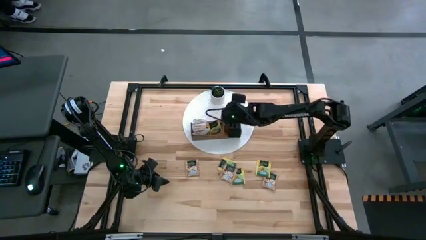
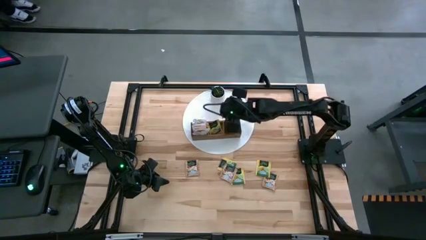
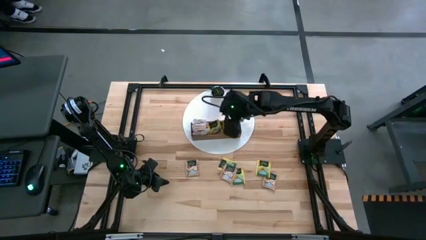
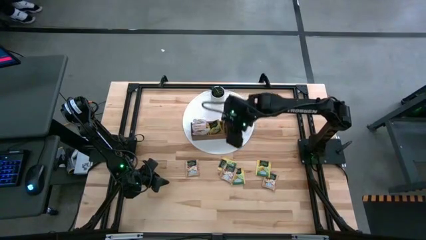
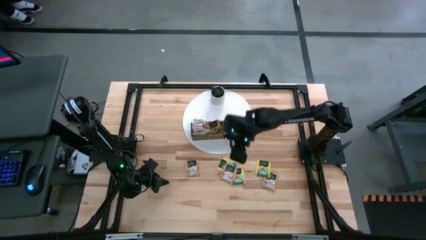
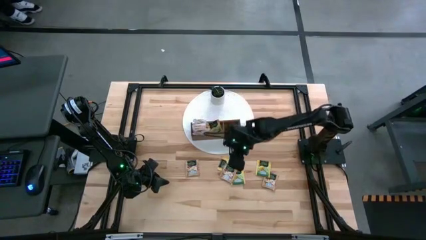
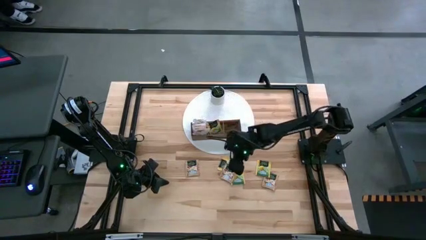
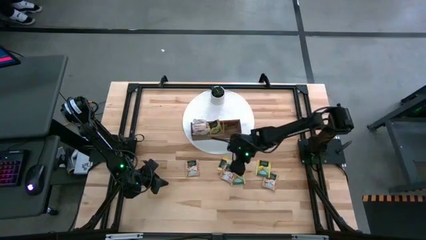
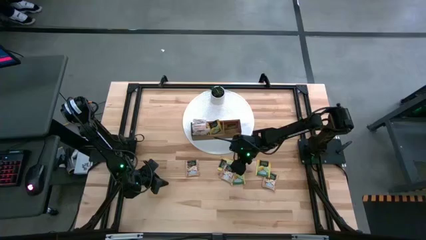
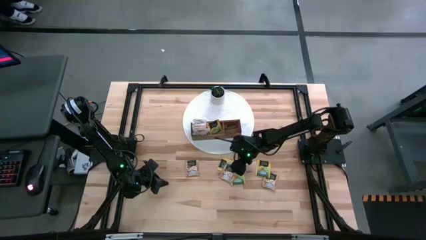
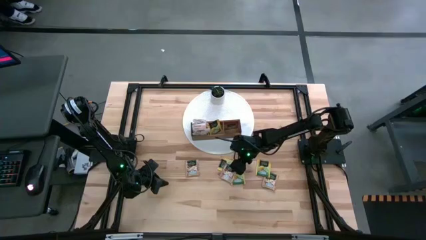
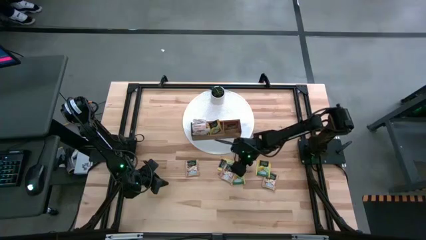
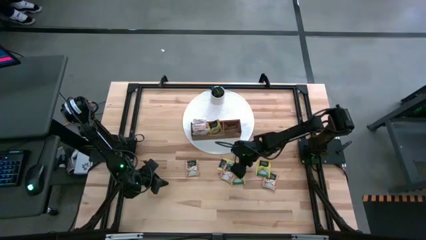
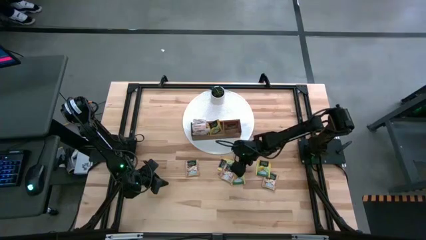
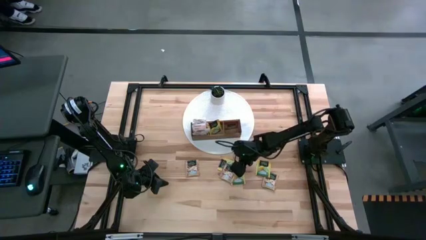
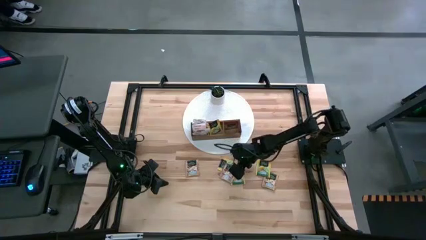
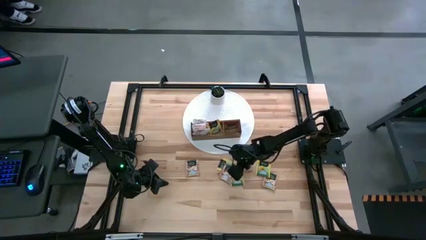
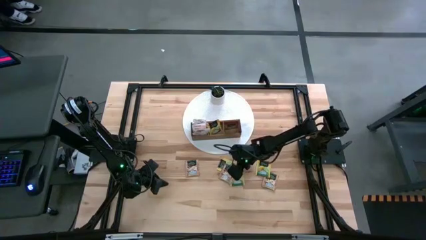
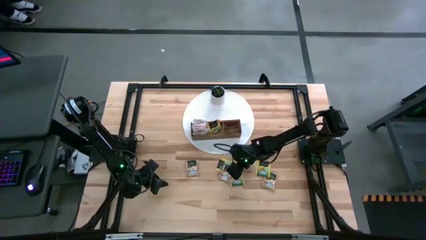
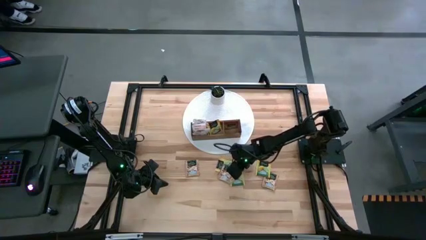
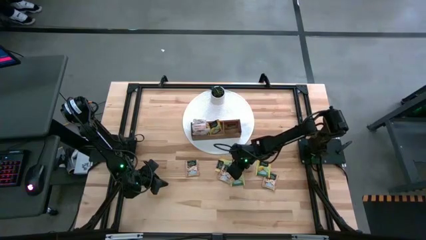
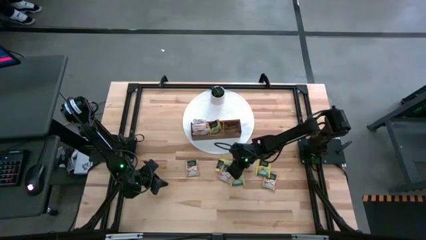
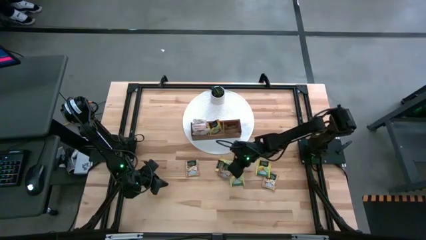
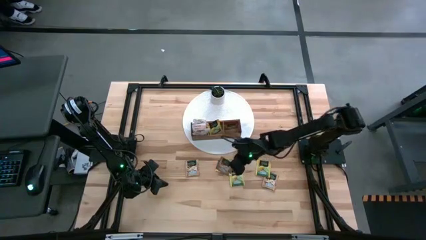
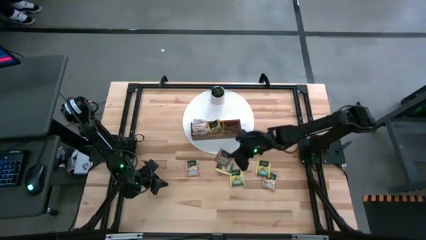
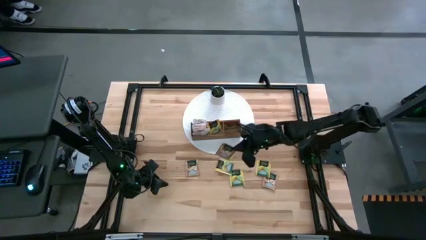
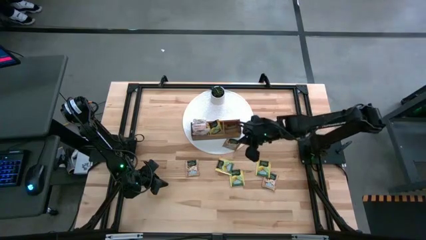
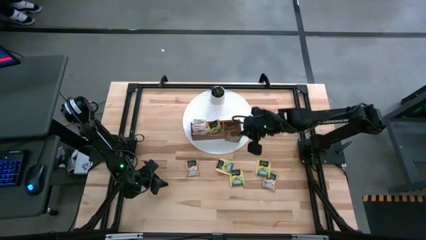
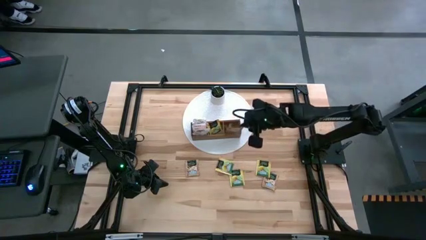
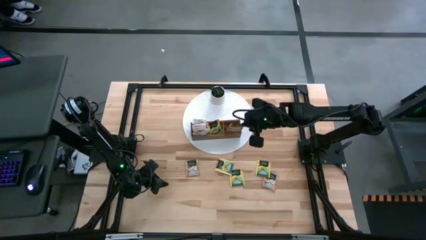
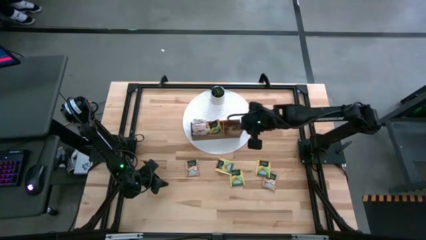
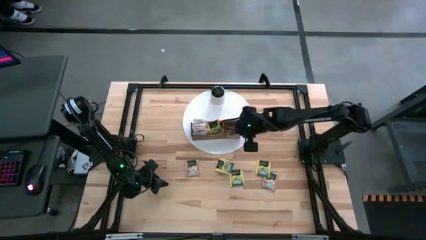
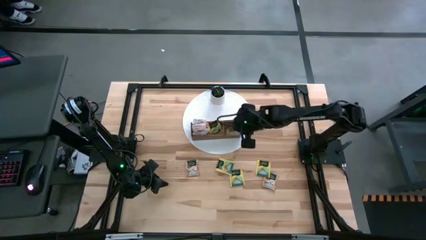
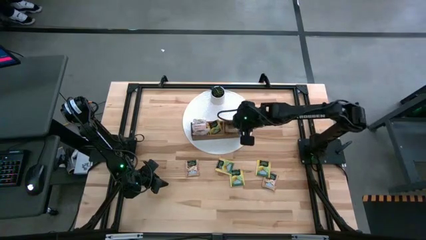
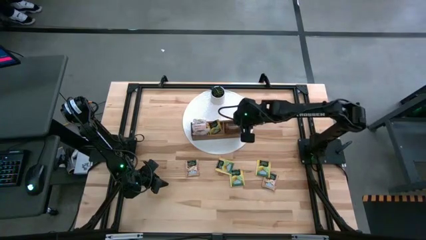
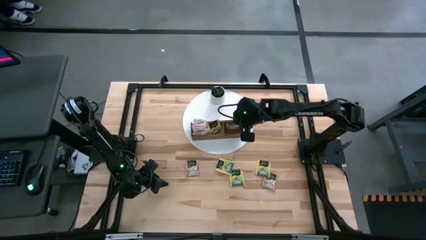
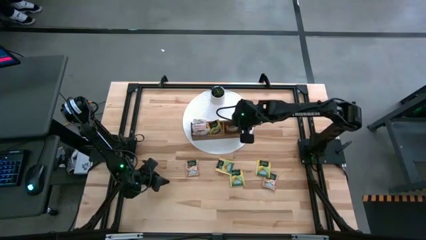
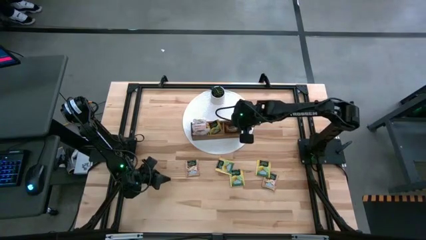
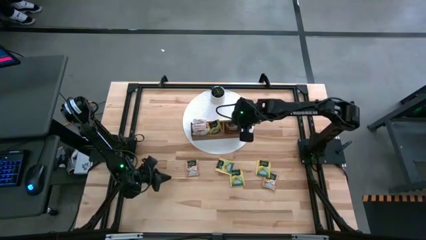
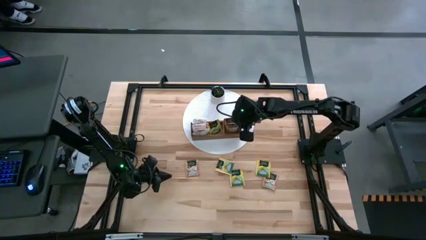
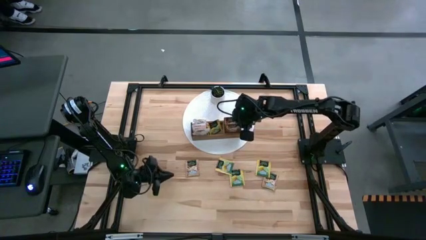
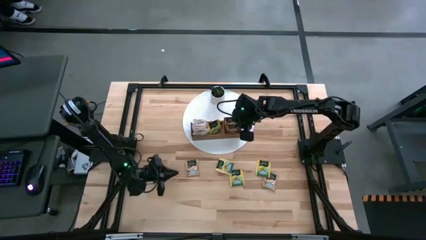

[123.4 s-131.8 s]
Task: Pick & Place Tea
Put the brown tea bag into the right section of the wooden organizer

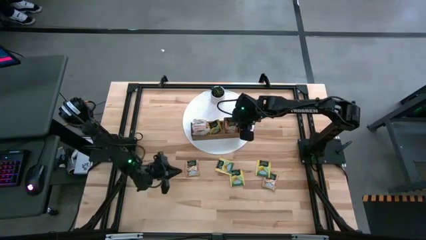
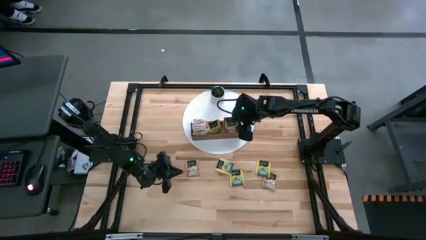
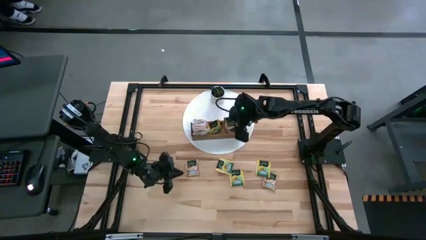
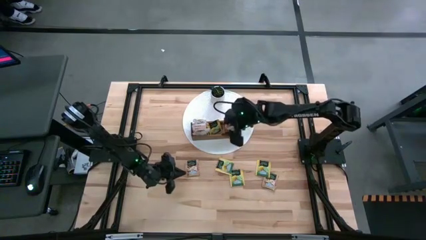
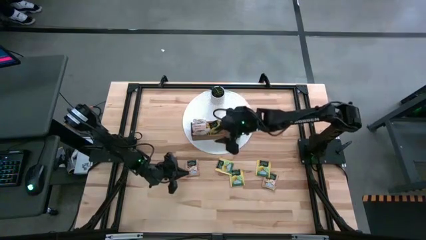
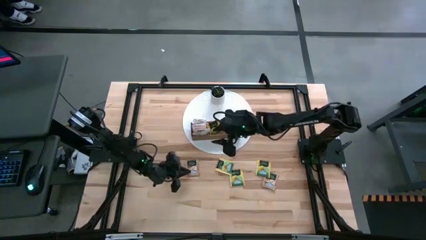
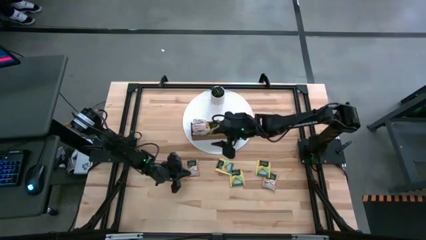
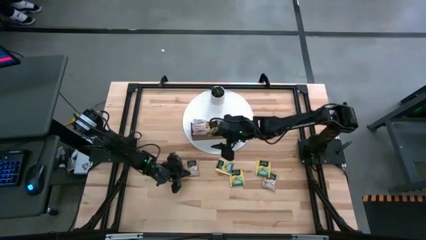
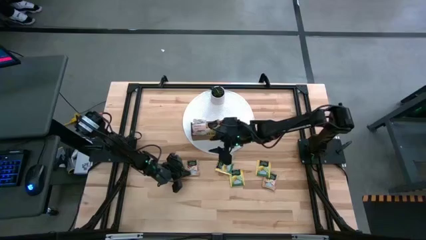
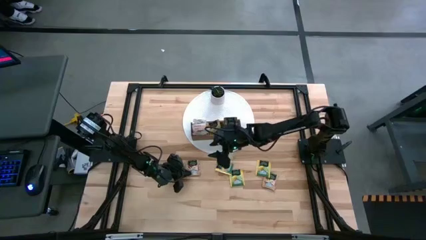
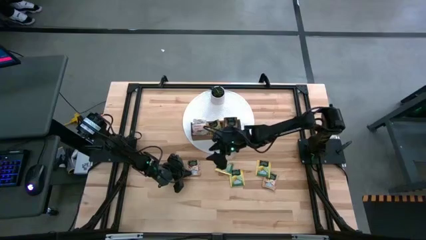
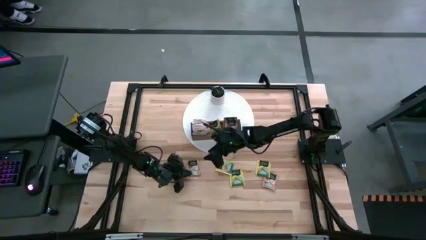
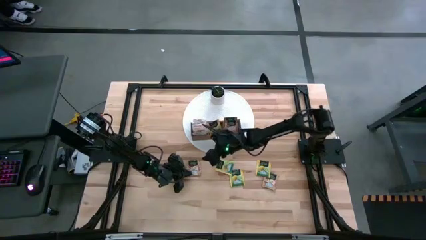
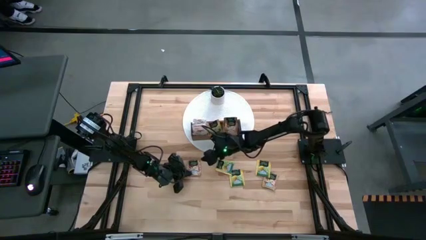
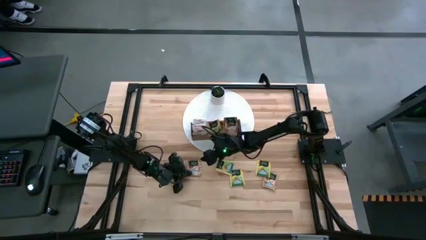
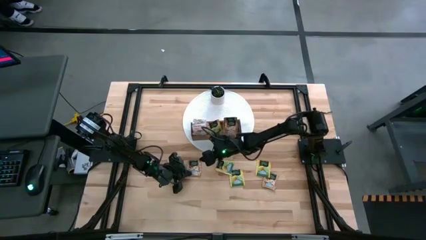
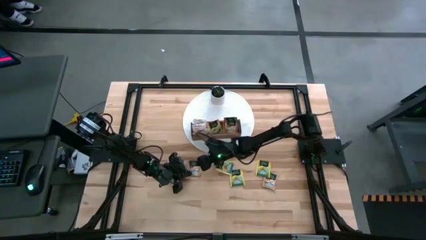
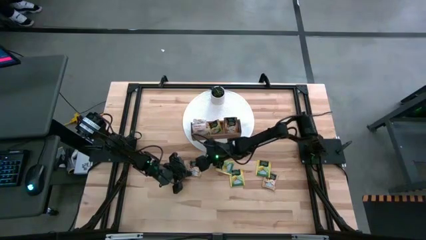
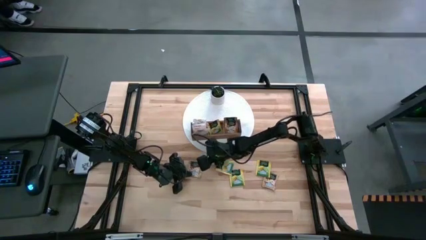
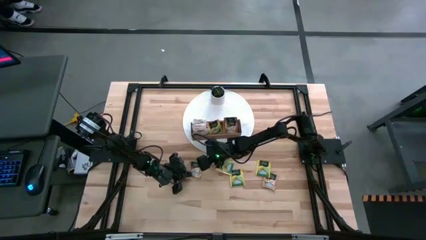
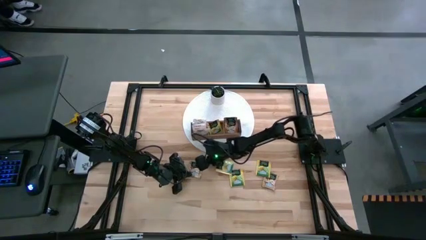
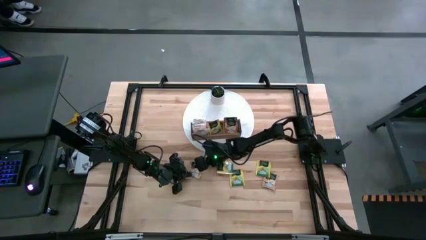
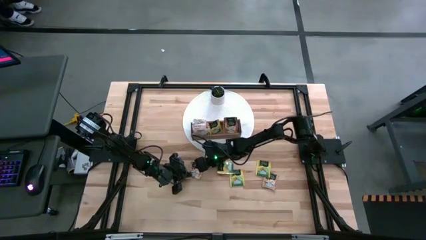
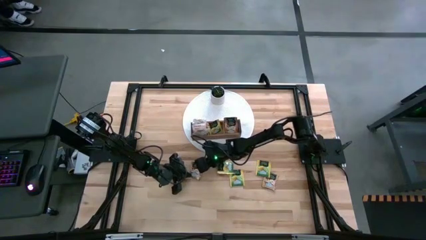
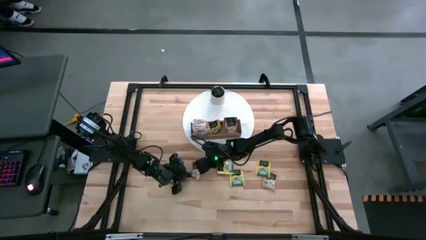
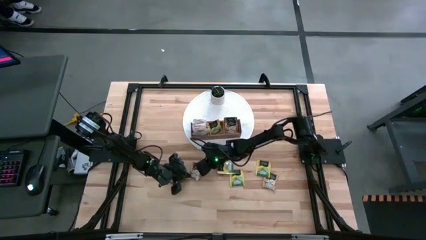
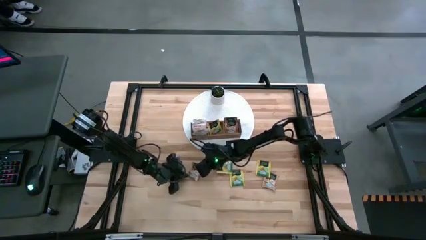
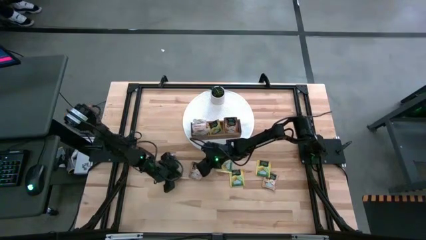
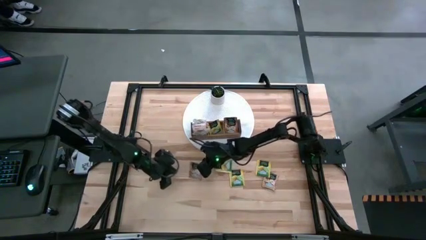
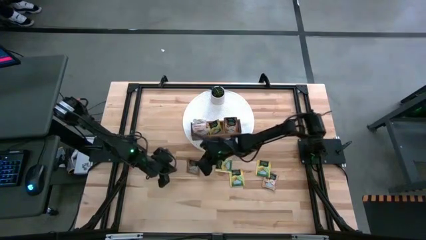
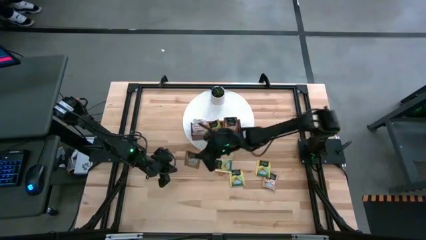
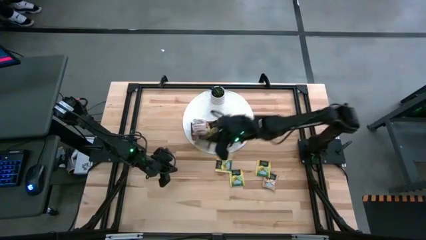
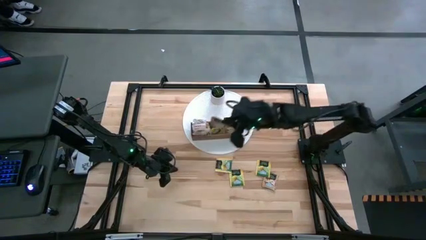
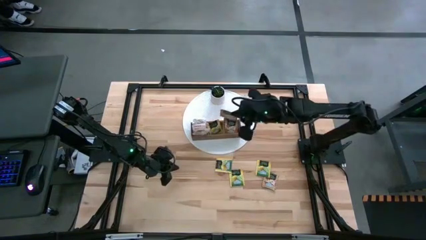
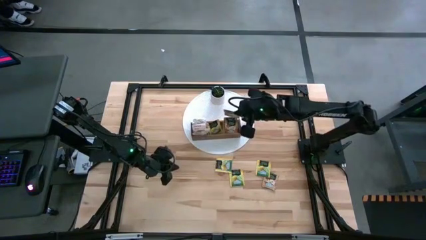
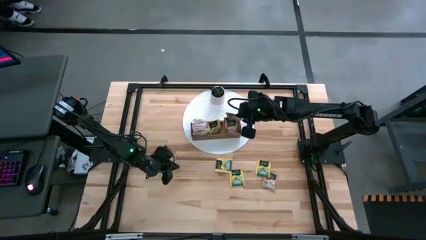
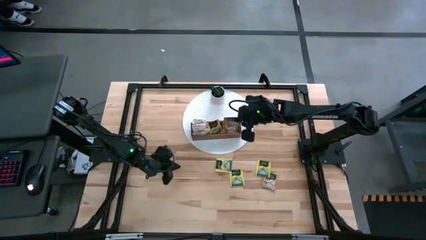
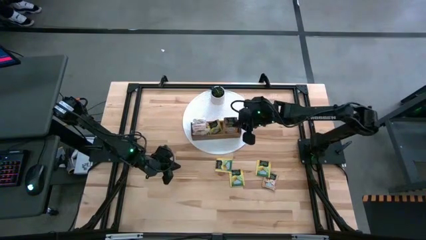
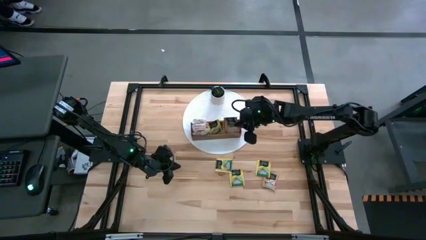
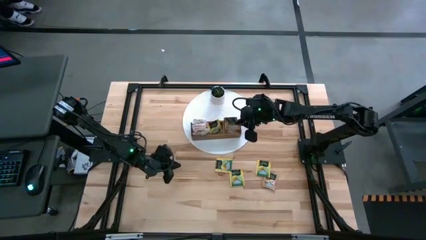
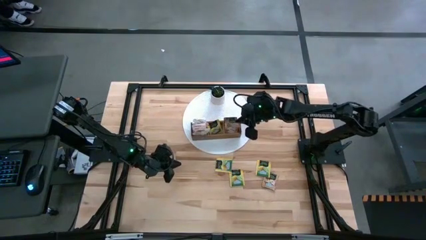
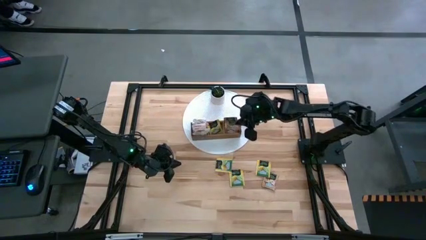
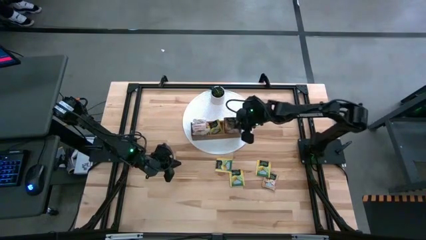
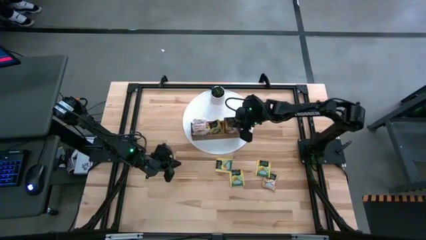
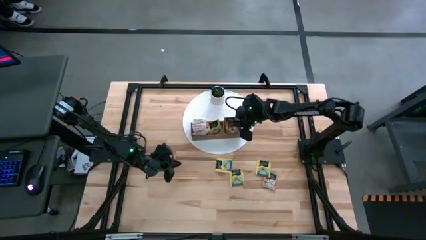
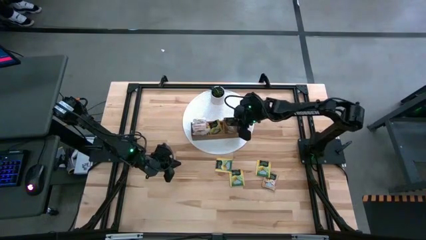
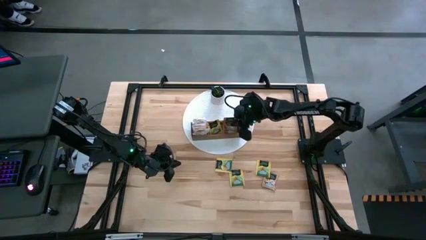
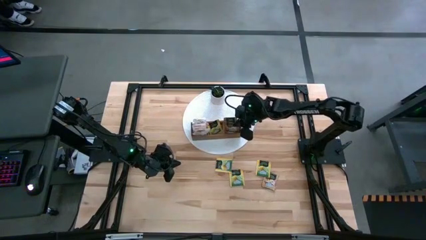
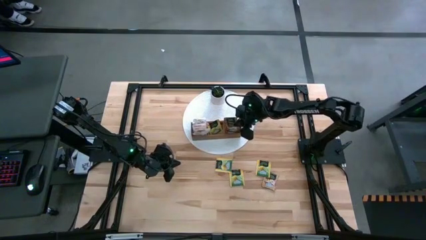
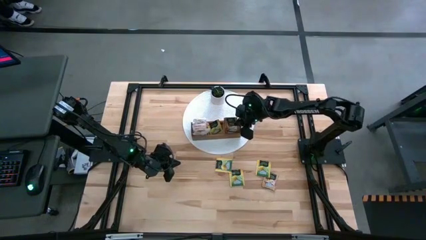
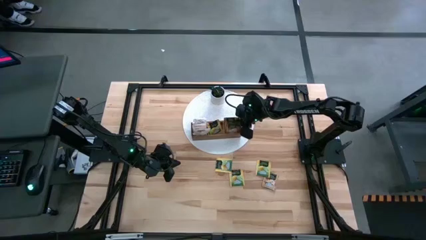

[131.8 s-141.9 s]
Put the brown tea bag into the right section of the wooden organizer
